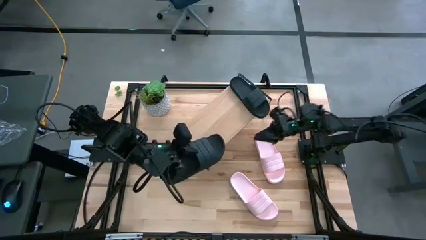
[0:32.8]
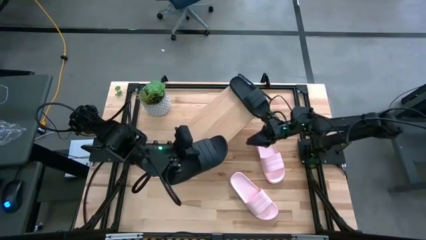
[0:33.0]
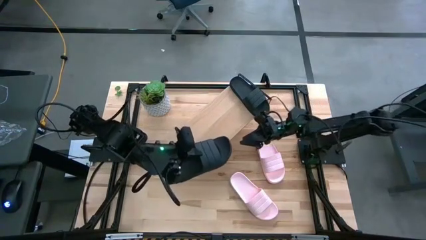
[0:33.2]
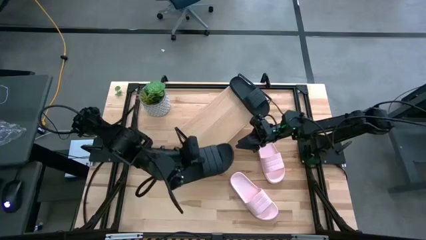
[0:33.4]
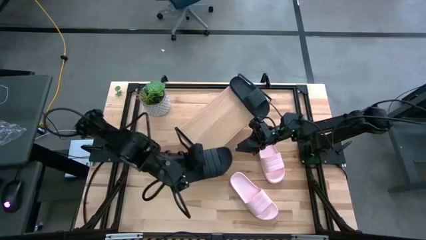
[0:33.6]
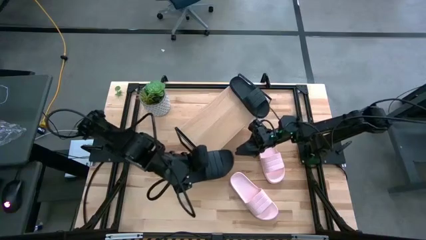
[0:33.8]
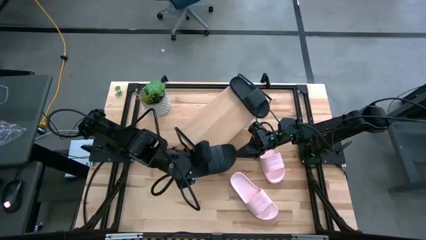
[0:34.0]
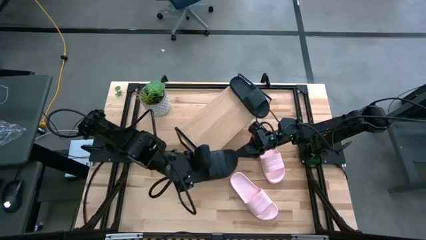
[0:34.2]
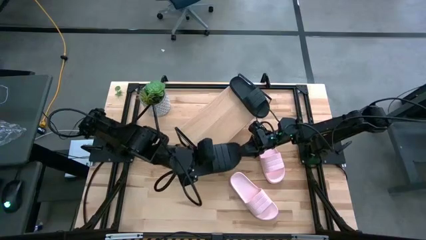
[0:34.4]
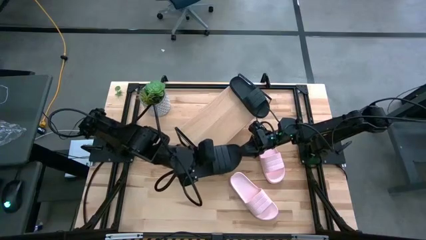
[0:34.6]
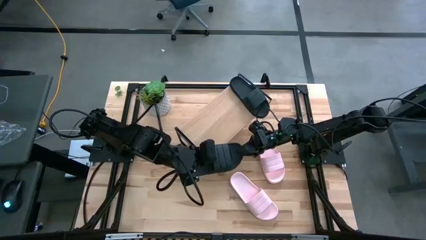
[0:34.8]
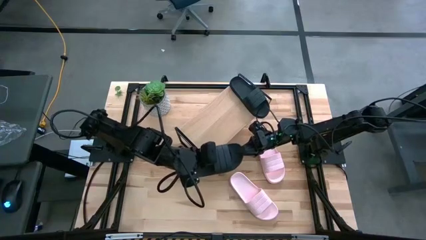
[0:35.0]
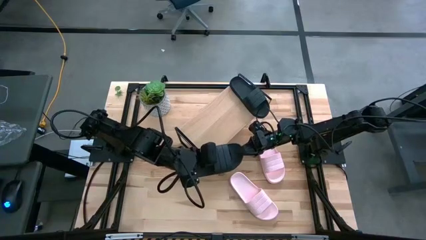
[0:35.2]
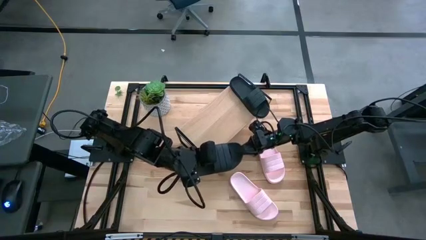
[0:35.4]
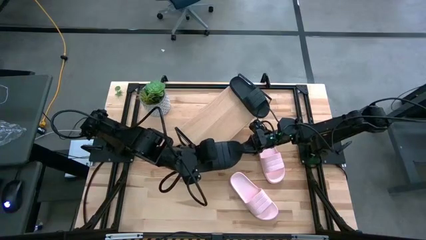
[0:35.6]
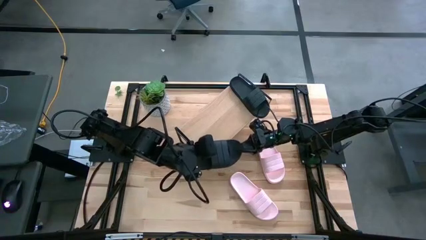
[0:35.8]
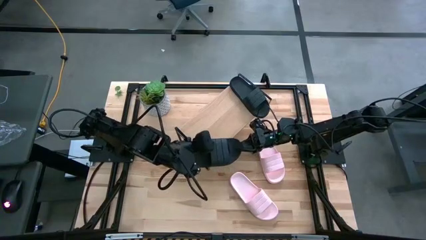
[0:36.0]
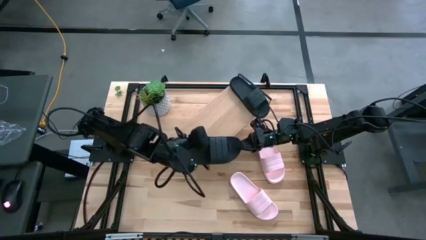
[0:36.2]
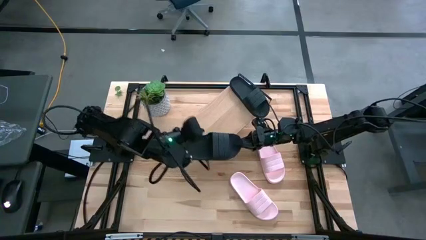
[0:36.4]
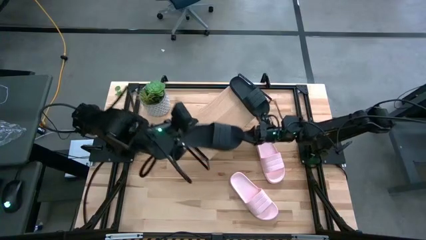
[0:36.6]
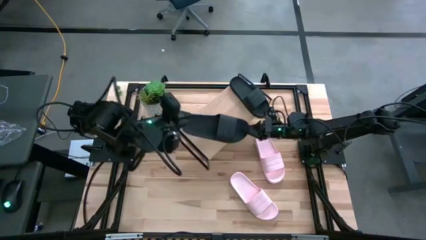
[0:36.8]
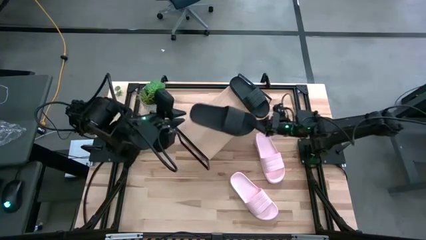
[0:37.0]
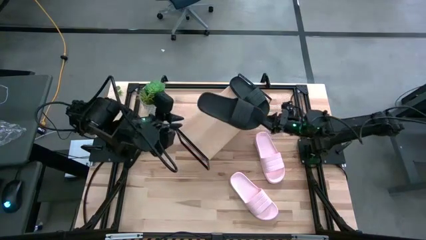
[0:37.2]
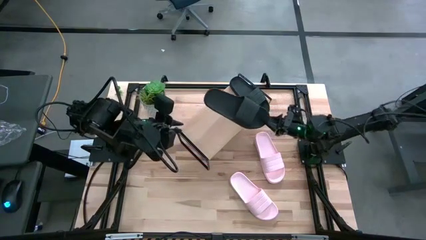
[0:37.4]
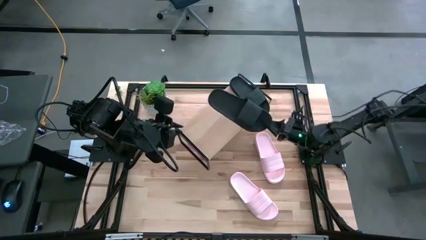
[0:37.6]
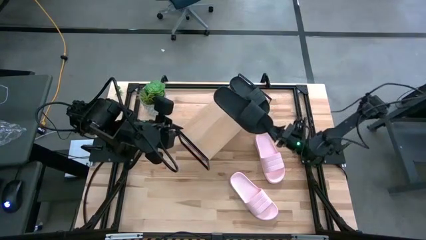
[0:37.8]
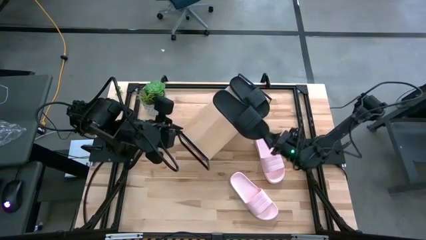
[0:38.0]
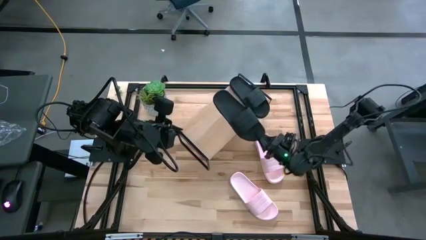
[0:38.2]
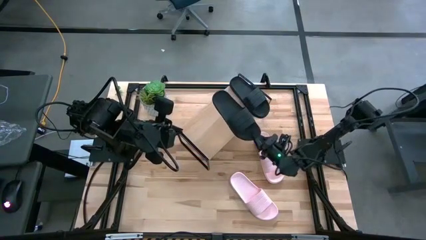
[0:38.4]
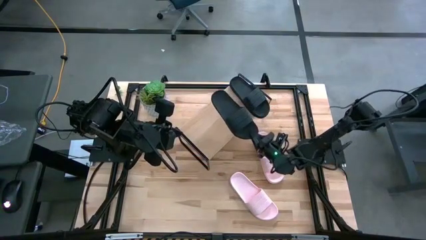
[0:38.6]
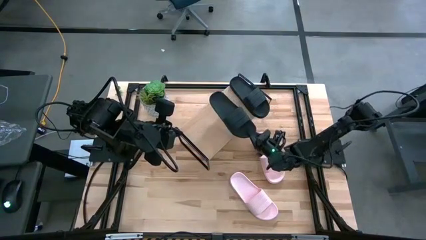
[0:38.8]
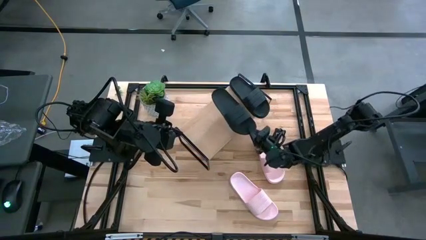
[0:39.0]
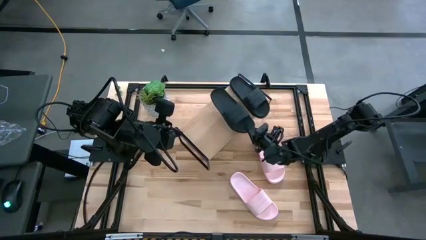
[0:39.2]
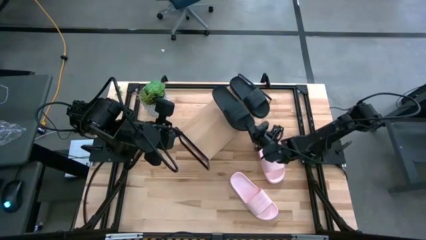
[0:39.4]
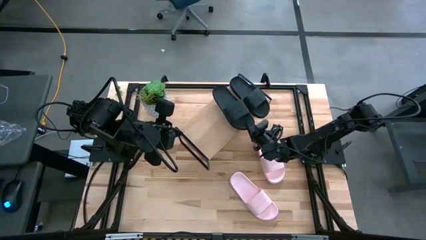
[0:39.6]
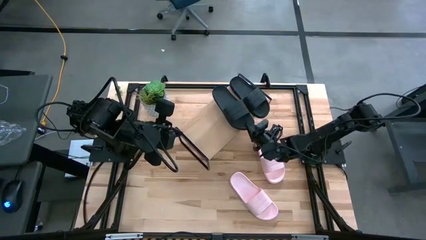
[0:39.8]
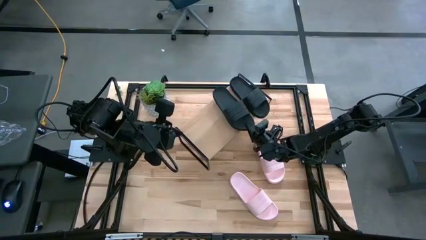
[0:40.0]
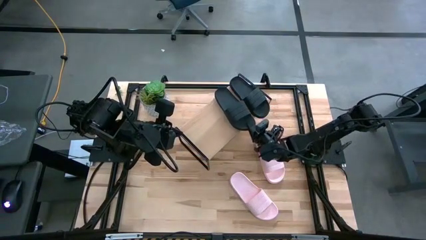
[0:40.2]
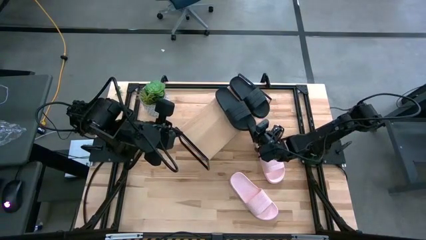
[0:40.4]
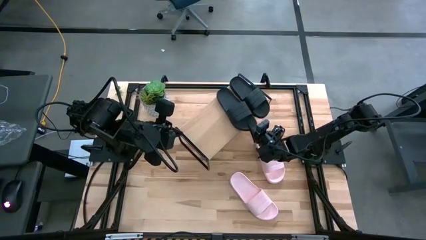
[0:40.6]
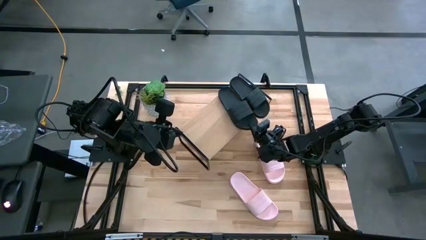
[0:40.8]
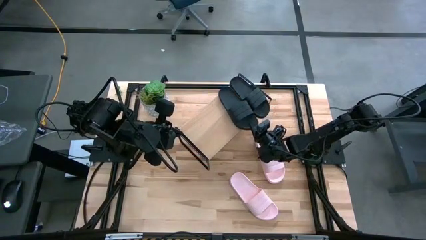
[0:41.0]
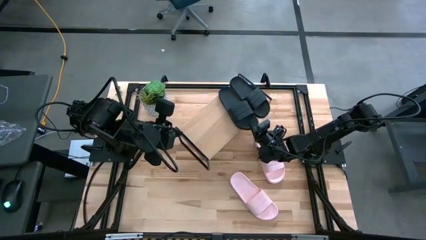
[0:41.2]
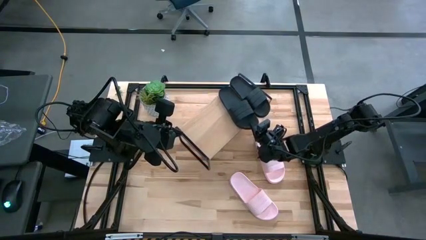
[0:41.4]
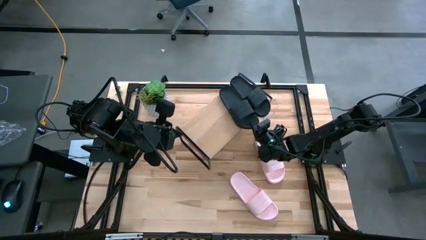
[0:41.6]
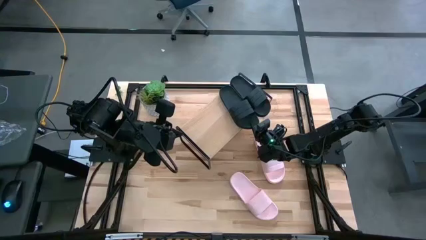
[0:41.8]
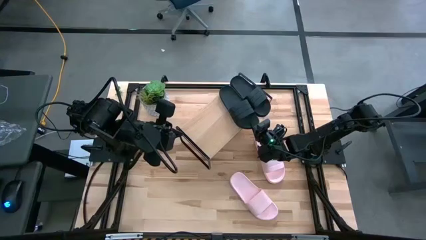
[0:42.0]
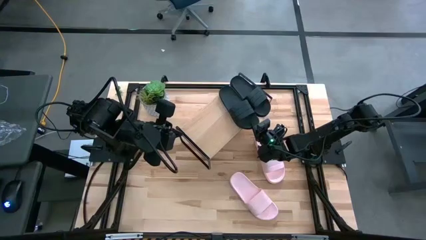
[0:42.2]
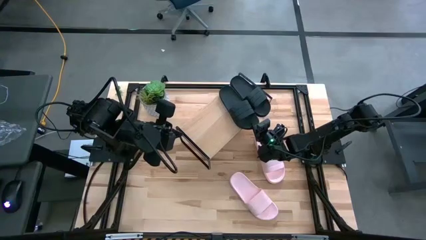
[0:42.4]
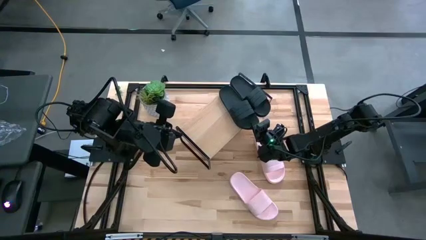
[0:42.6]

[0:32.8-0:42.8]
Task: Pick and place slides into the shelf
Put the black slide on the shelf

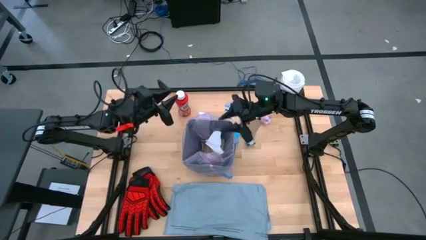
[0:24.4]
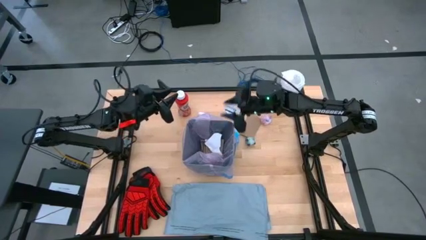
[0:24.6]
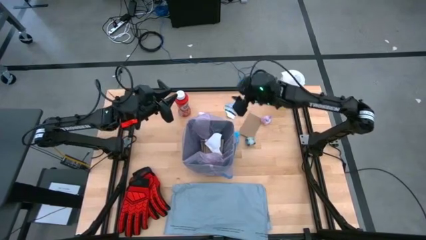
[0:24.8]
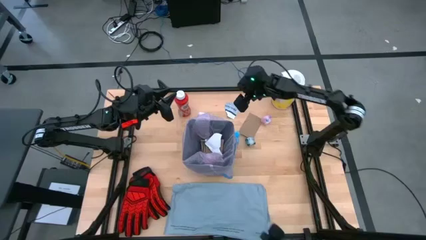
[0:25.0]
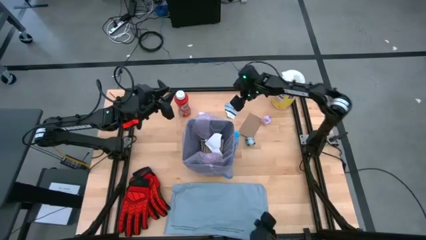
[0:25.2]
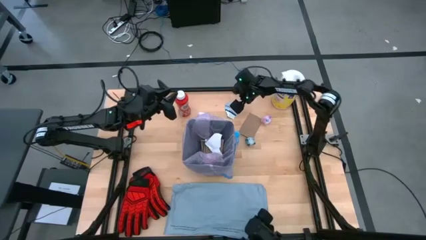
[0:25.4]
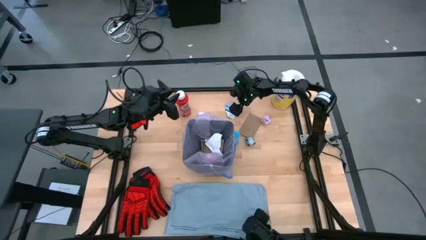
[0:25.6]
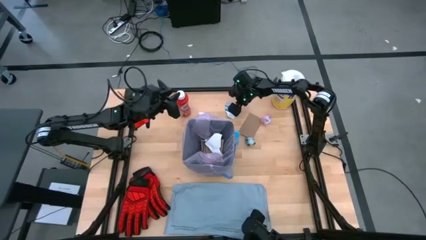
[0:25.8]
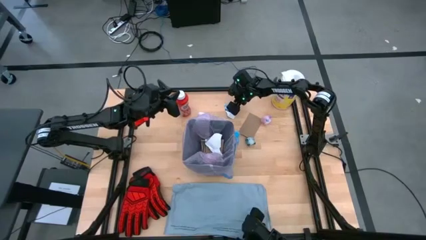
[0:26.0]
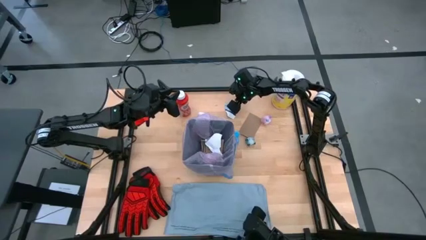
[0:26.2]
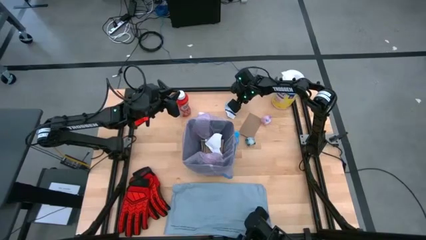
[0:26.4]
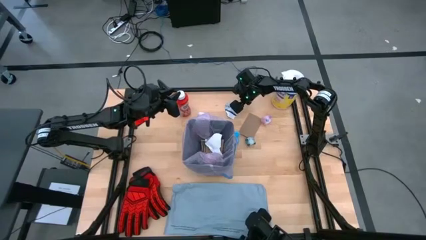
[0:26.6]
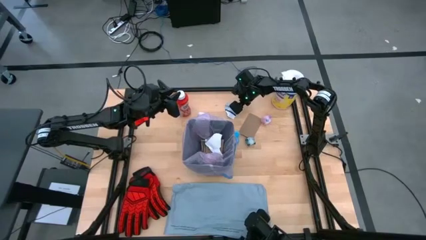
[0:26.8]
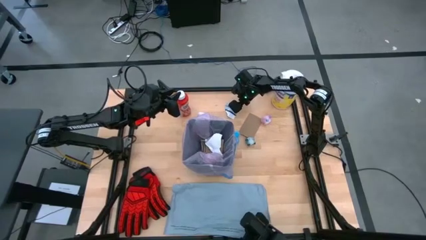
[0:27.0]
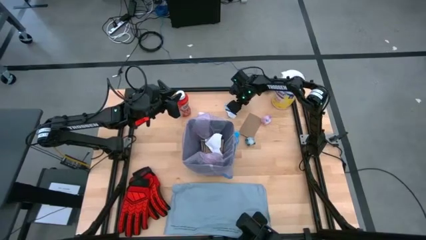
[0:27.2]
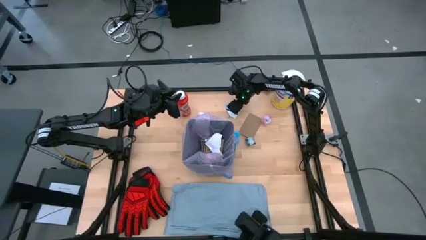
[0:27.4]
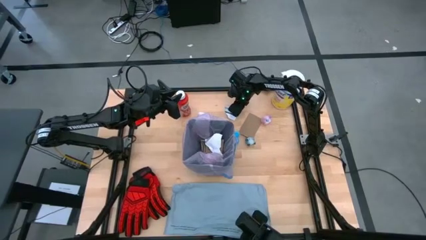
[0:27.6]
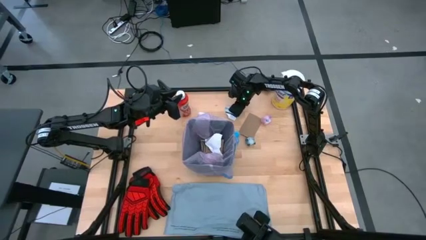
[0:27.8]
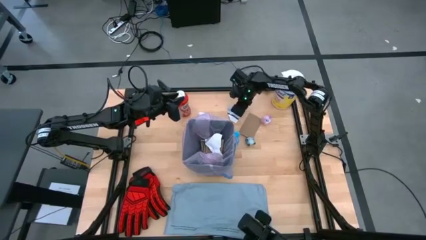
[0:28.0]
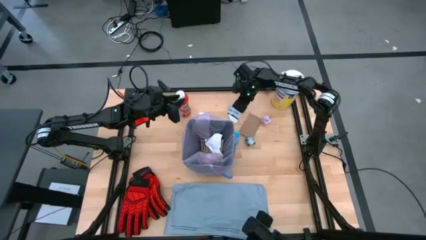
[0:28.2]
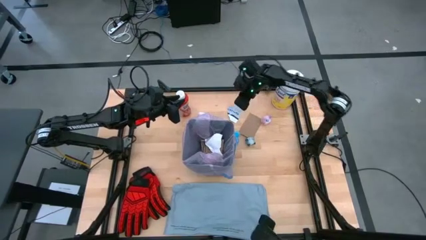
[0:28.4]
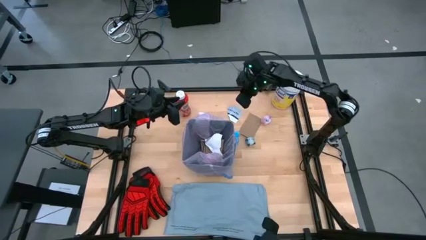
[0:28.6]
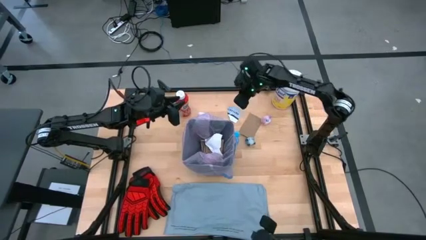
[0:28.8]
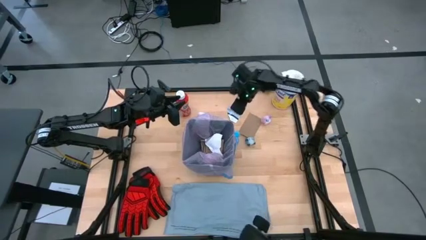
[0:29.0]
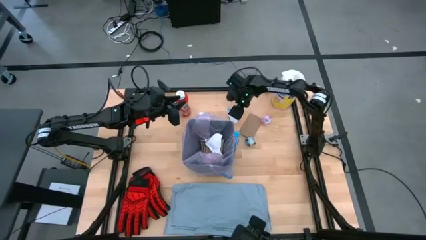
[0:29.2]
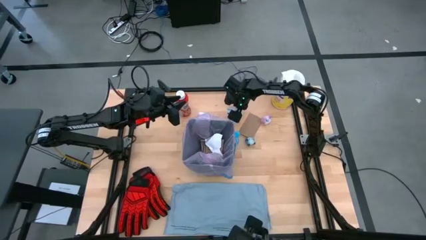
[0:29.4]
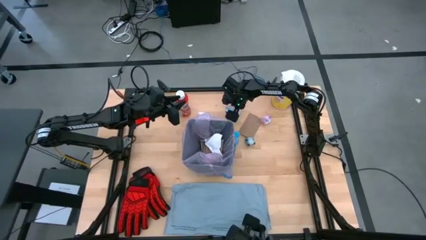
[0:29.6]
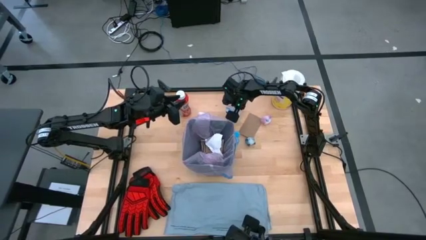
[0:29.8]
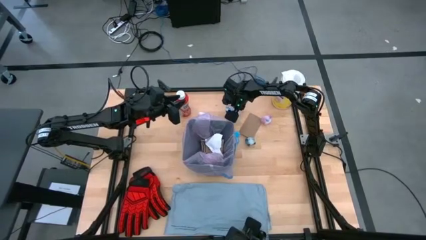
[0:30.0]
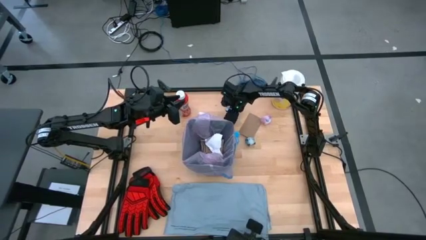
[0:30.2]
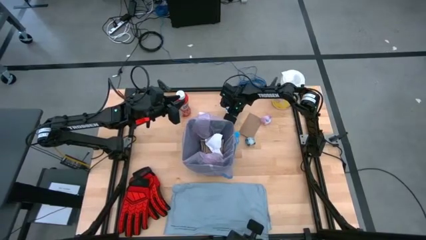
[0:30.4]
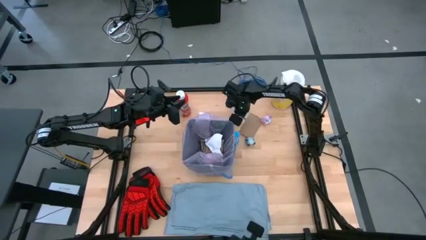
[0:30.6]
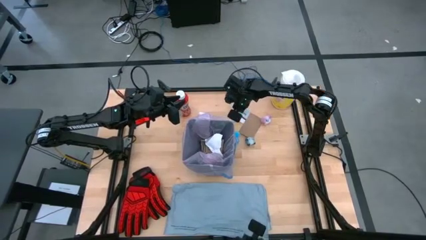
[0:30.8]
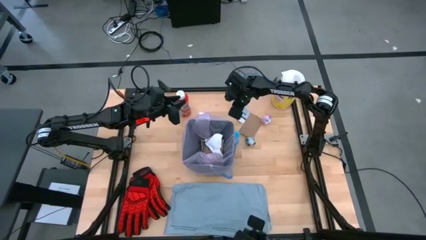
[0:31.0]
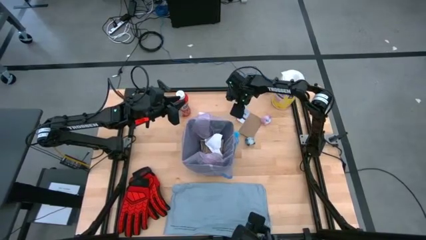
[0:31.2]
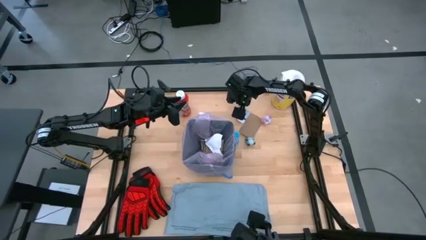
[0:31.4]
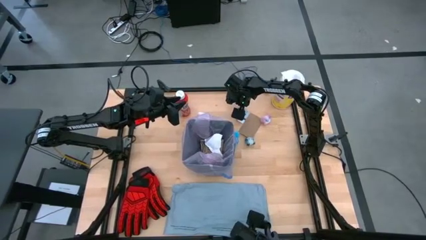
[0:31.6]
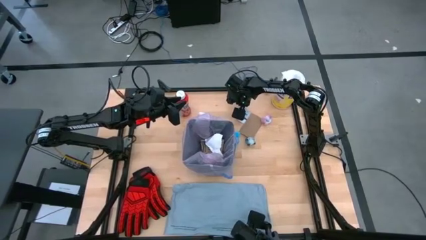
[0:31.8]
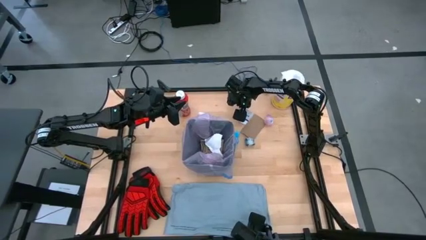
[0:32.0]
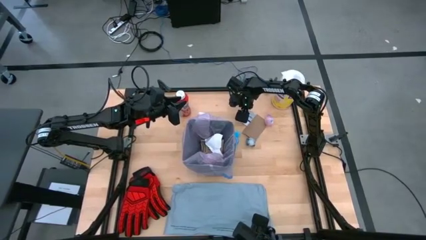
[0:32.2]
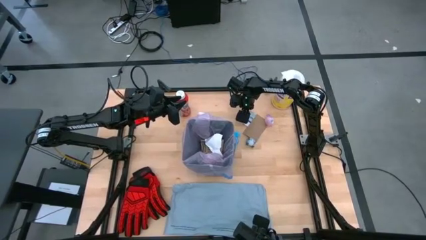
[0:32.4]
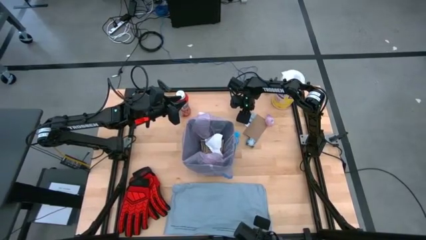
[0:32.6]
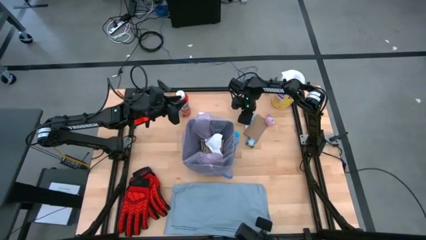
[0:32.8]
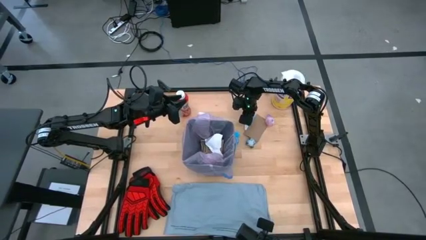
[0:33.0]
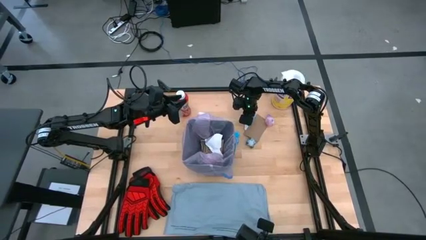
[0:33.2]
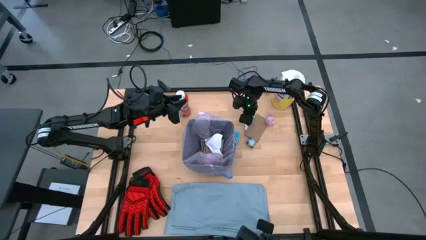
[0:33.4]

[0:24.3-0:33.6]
Task: place trash/remove bag and relplace
Put the white paper material into the trash bin
